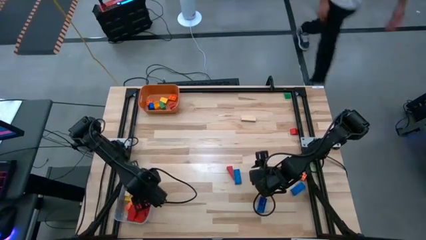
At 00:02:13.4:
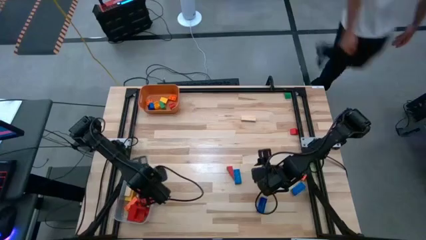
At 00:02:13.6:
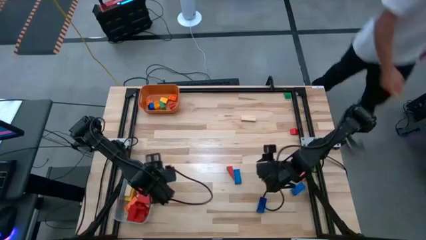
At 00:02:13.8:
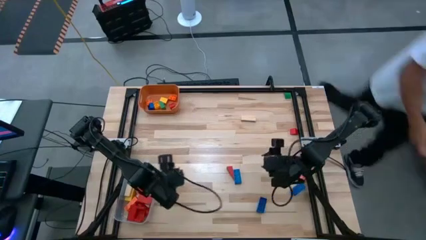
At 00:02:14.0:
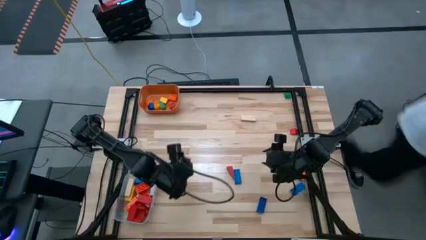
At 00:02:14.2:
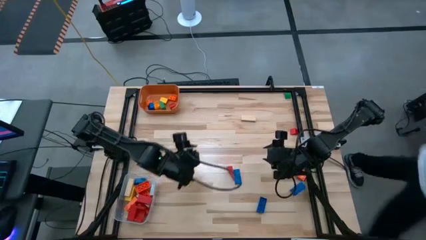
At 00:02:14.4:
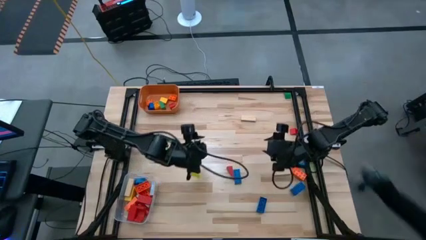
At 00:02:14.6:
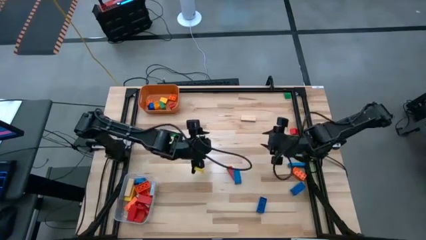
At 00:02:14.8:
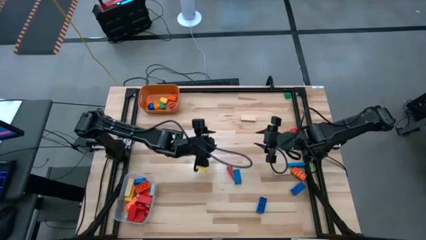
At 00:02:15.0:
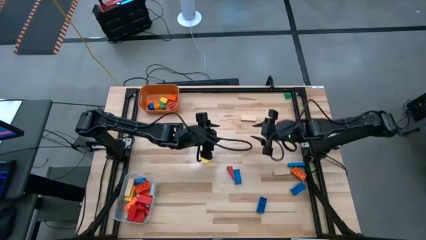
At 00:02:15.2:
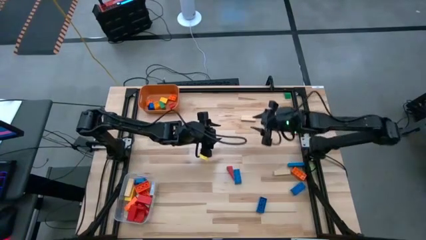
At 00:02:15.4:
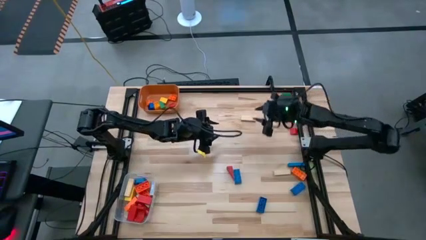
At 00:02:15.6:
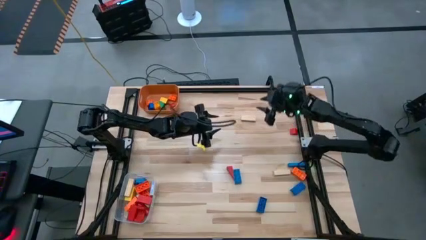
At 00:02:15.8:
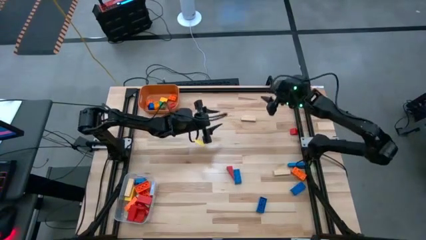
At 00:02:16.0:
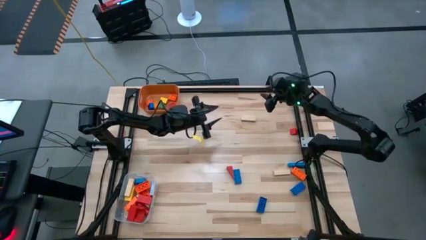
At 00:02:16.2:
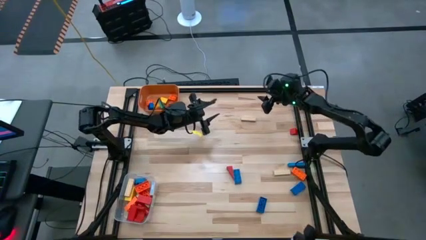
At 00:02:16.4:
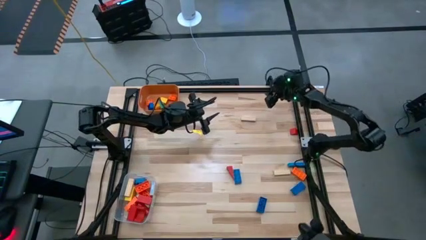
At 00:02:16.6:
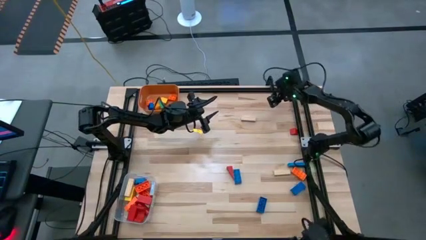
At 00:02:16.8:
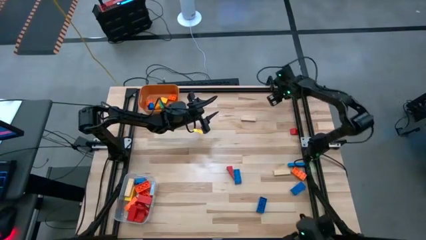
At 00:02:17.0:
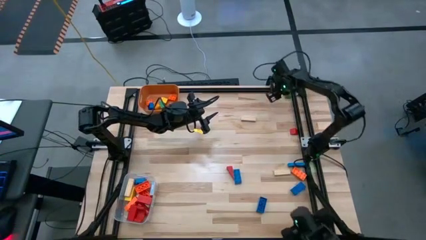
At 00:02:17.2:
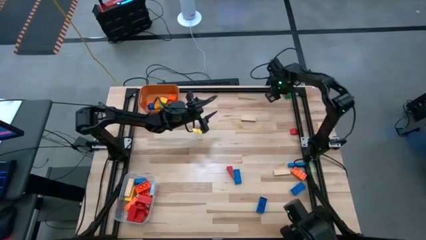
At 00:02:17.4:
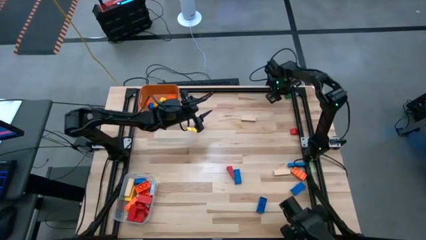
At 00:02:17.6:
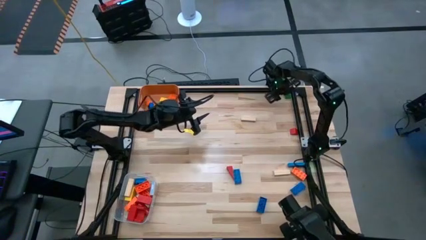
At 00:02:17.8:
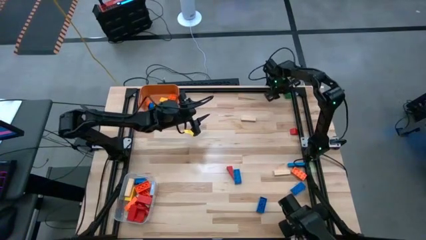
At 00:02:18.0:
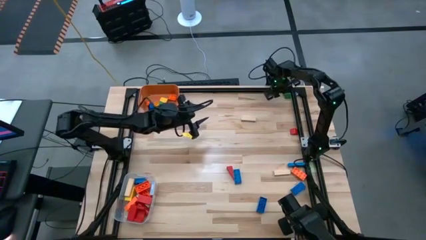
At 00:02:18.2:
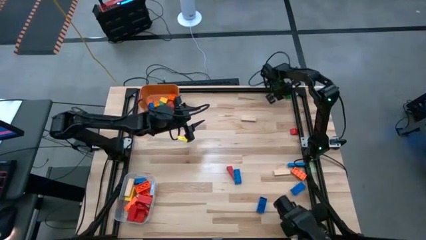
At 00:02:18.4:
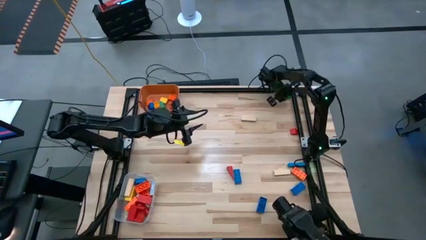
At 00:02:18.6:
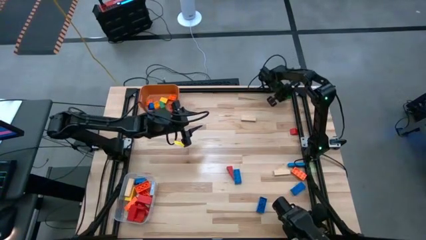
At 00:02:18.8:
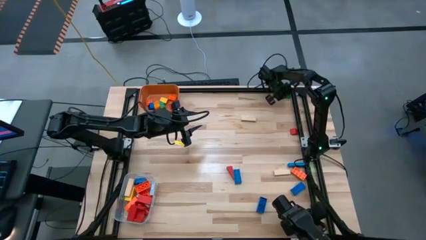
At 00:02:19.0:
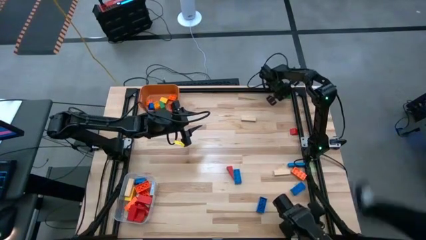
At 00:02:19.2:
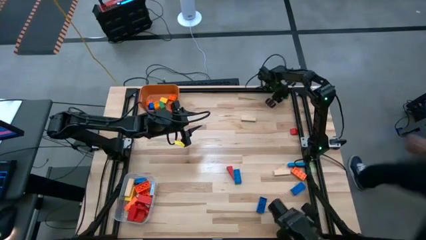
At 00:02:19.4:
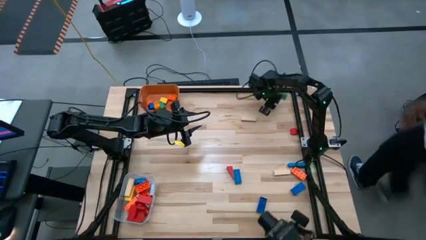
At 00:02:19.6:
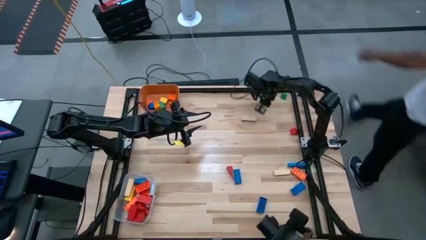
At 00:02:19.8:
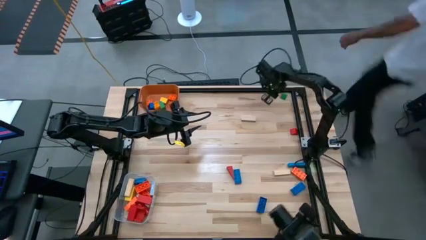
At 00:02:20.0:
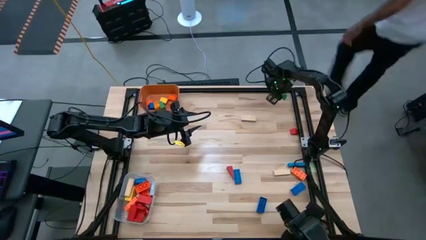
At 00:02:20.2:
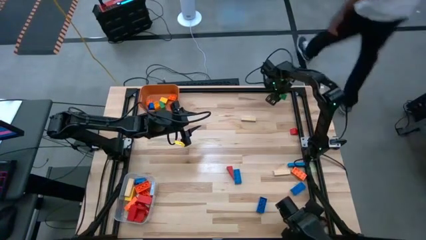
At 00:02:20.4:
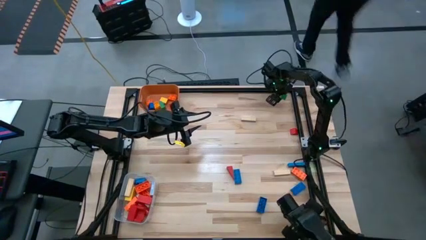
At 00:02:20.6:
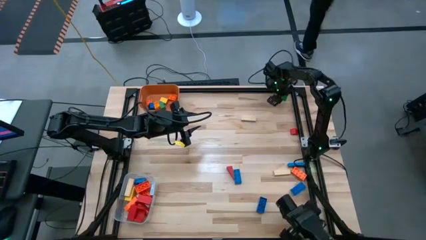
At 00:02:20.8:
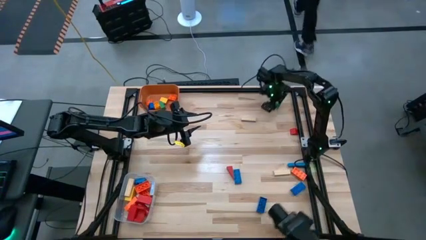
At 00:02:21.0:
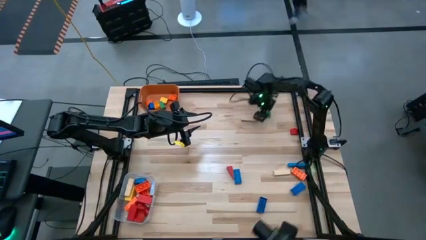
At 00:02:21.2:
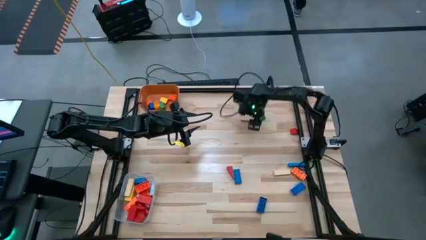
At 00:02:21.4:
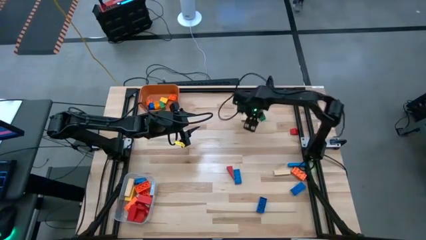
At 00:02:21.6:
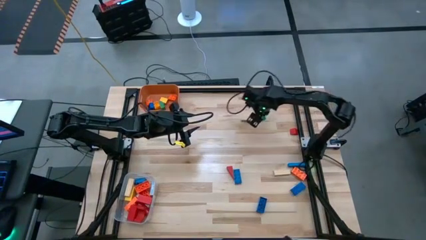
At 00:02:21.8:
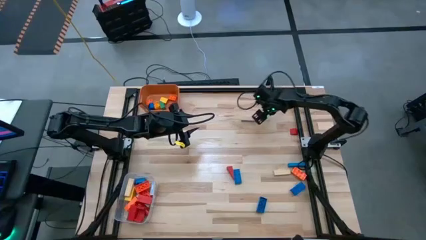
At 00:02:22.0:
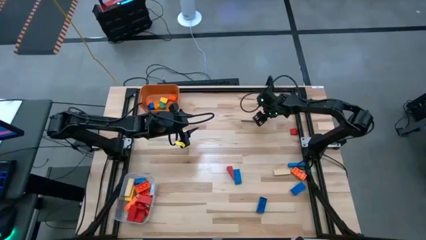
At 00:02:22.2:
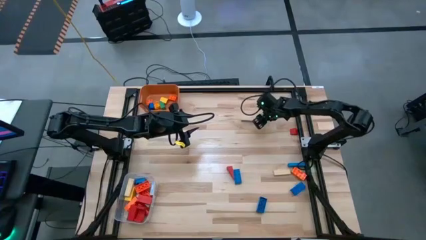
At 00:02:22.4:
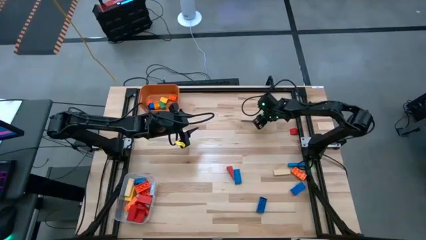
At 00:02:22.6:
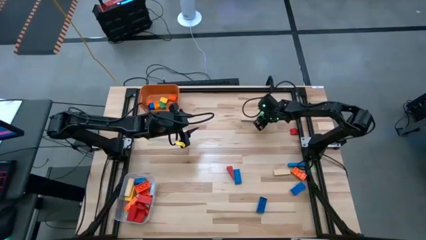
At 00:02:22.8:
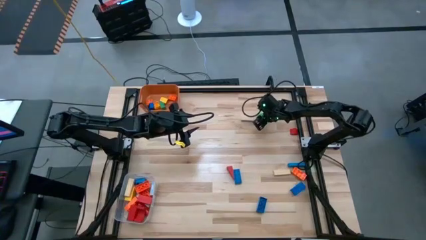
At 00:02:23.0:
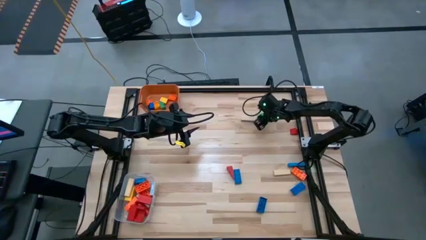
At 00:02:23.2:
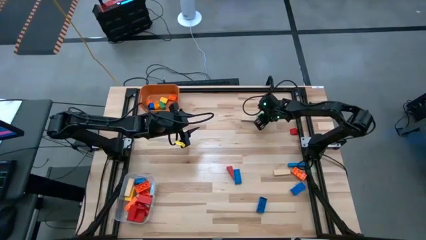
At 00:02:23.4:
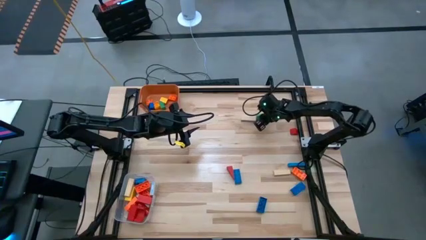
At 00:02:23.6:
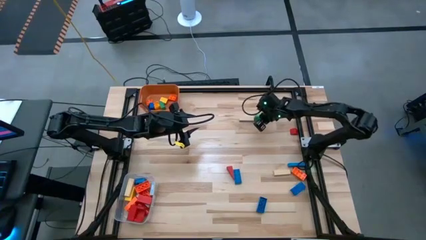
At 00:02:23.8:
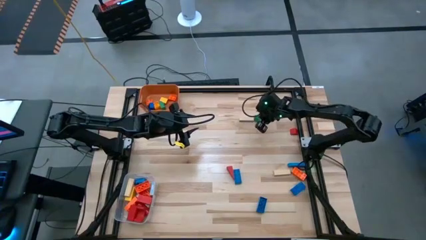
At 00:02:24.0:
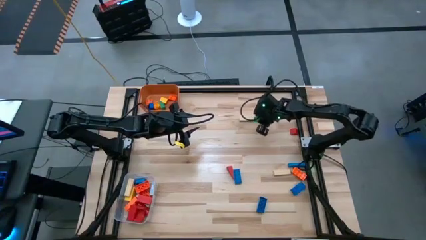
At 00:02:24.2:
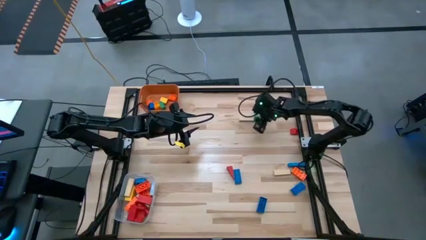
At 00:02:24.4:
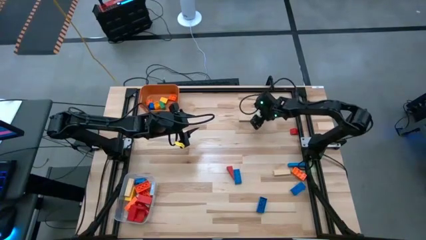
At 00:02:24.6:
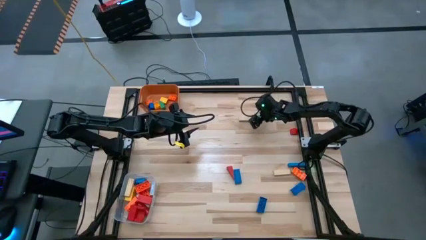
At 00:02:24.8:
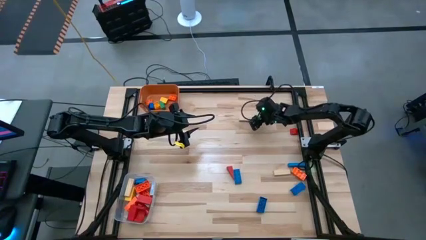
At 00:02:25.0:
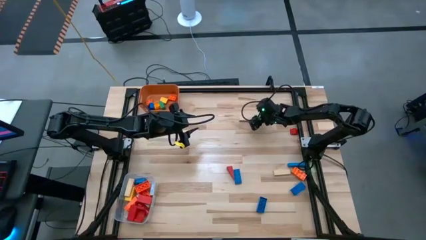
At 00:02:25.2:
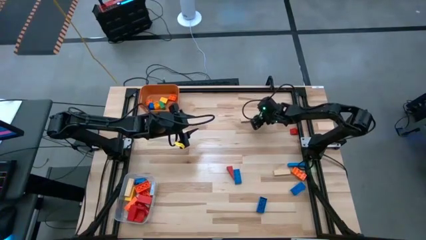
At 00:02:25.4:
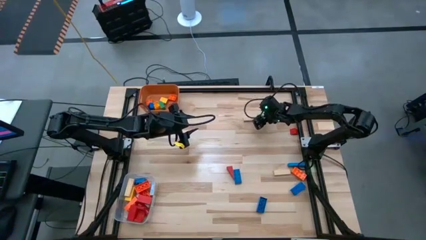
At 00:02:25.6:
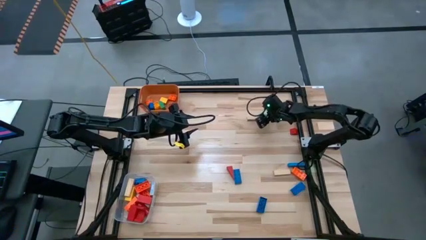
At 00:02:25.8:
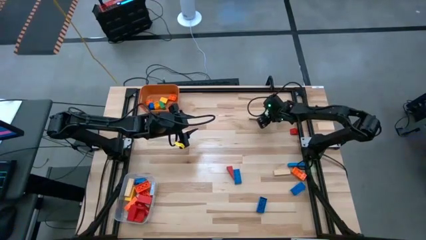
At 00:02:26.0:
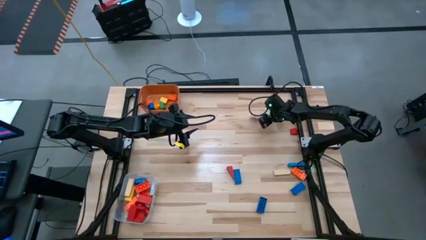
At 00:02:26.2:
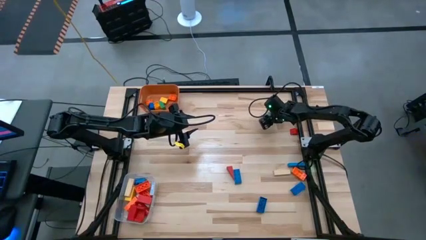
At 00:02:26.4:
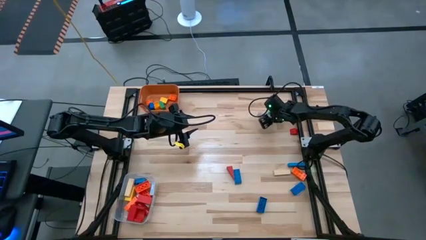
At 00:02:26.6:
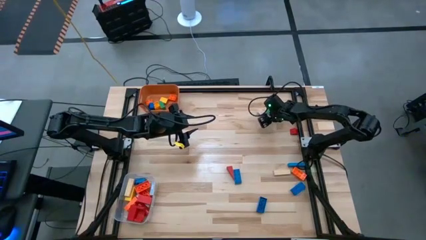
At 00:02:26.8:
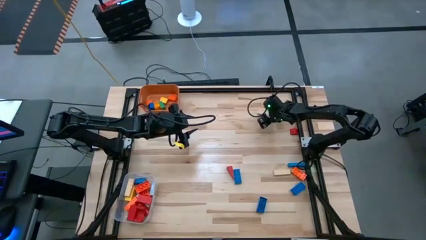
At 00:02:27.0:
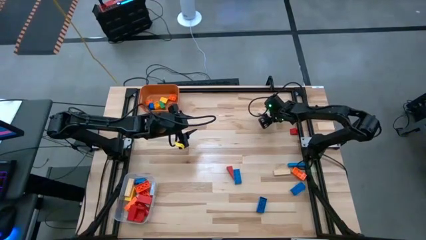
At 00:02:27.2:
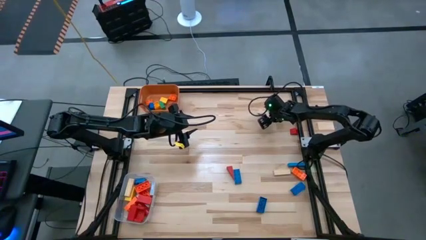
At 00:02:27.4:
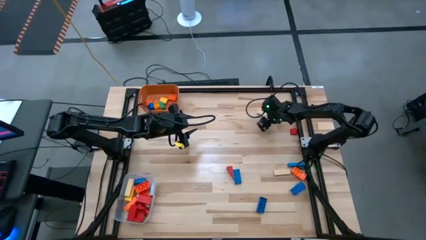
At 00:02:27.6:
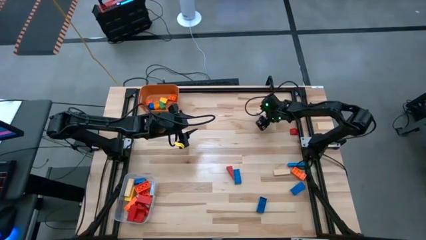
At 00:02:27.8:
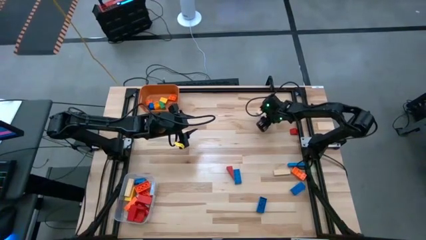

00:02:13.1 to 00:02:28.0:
Task: Sort blocks by size
Put the small green block into the orange bin

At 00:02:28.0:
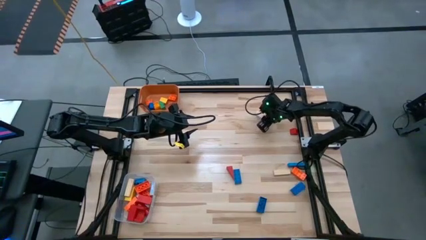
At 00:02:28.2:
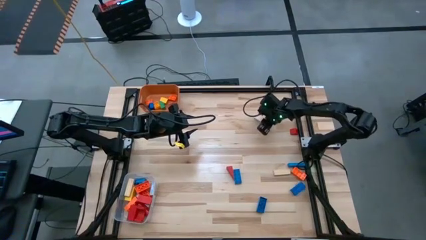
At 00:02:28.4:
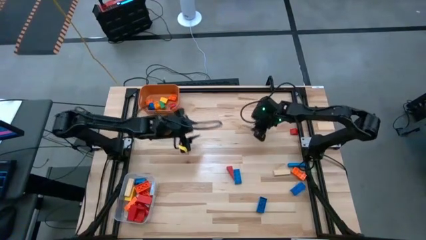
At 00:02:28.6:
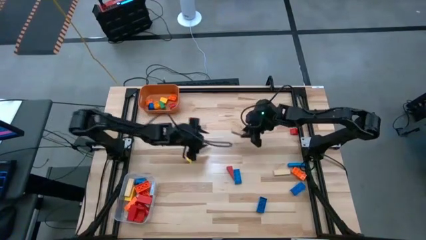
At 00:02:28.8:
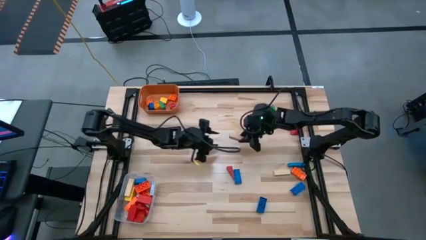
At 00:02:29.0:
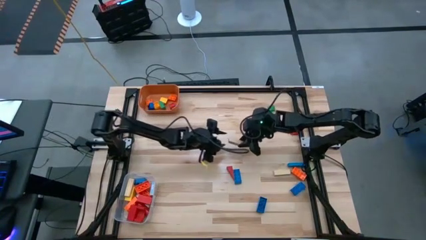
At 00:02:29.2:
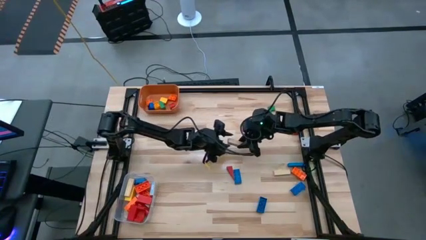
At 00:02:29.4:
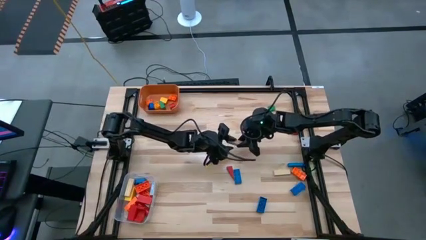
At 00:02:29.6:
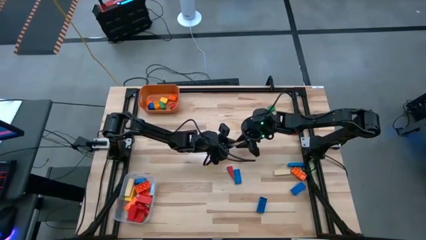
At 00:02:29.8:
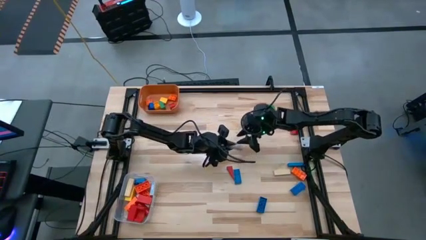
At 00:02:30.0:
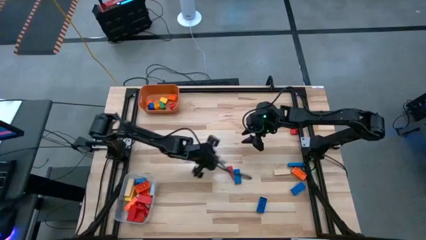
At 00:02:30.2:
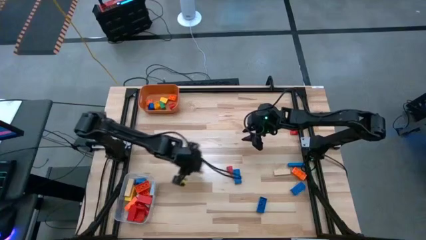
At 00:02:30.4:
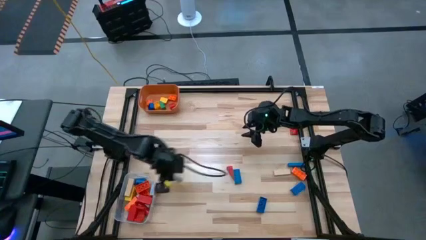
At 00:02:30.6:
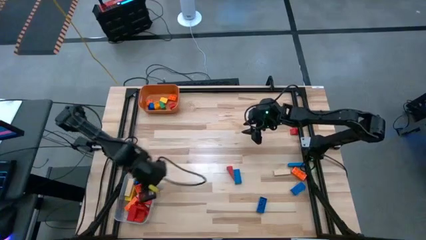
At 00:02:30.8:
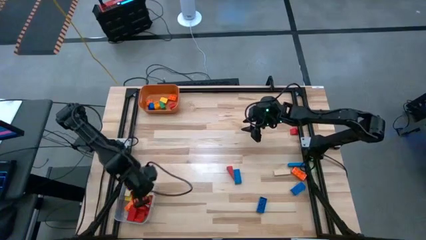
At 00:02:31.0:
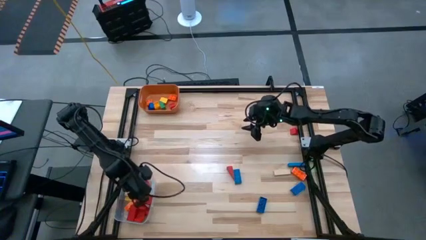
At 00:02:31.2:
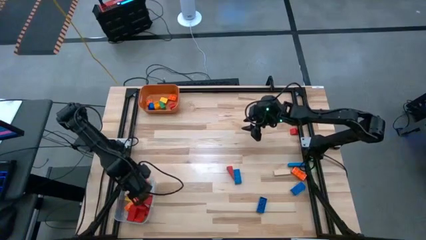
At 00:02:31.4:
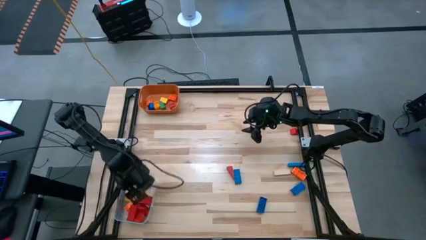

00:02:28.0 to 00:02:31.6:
Put the large brown block into the transparent bin
